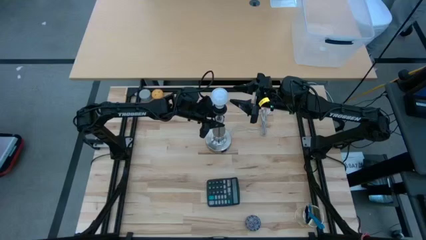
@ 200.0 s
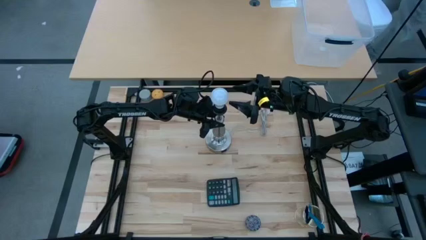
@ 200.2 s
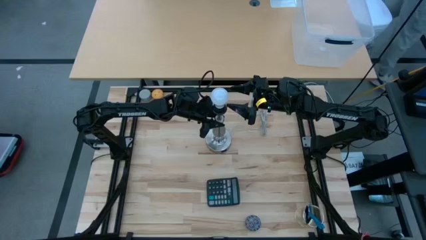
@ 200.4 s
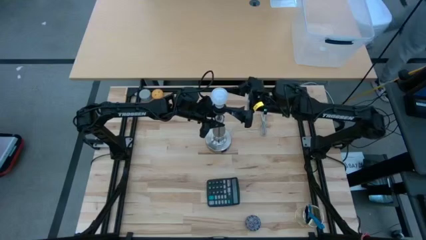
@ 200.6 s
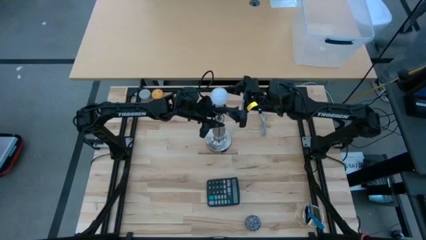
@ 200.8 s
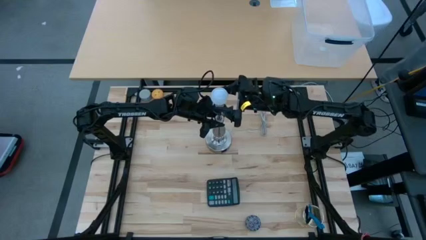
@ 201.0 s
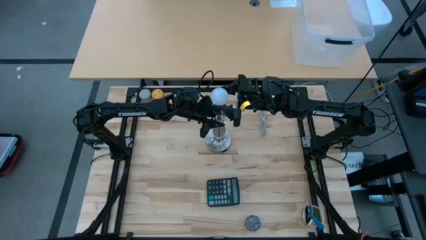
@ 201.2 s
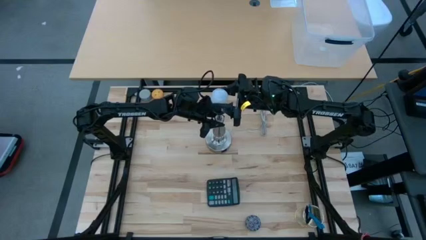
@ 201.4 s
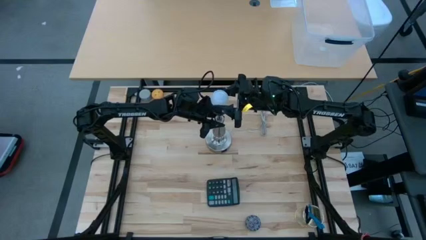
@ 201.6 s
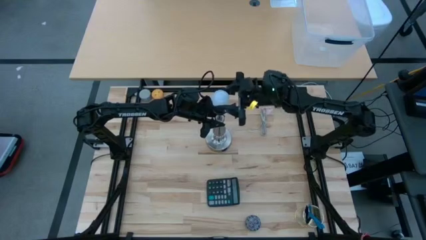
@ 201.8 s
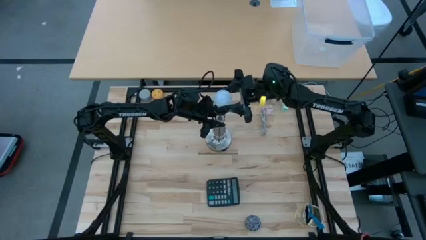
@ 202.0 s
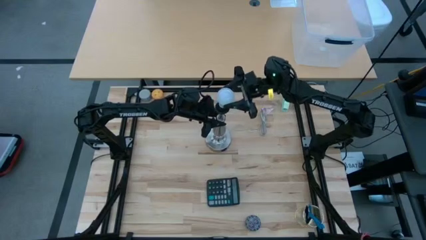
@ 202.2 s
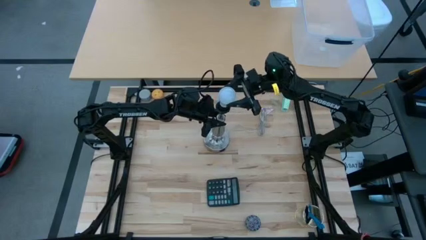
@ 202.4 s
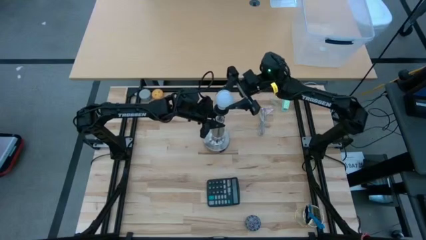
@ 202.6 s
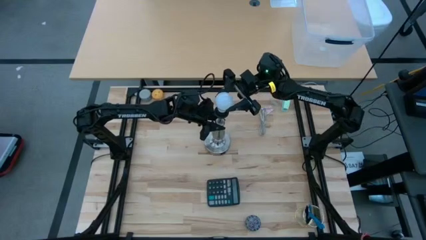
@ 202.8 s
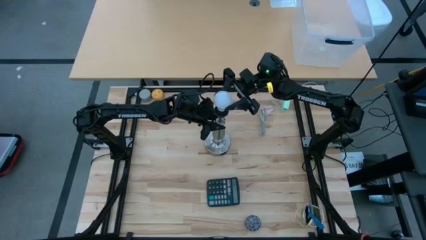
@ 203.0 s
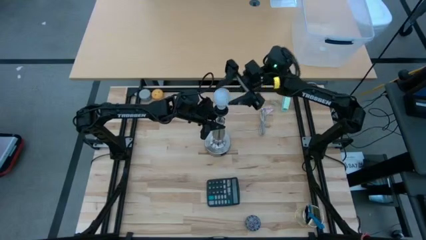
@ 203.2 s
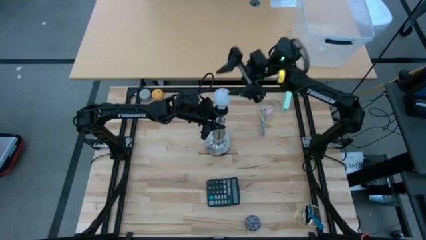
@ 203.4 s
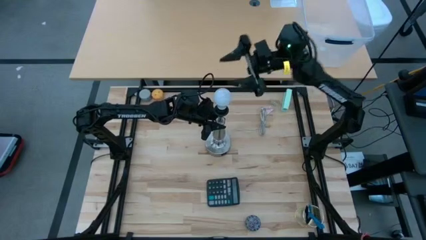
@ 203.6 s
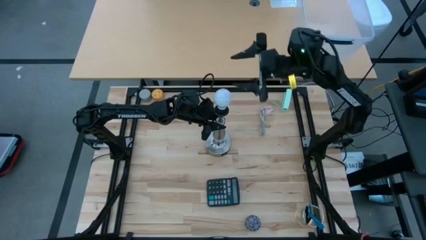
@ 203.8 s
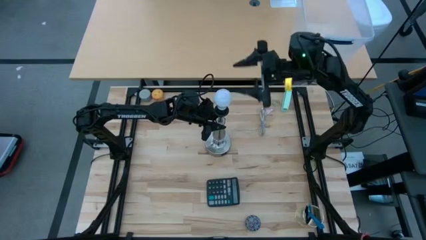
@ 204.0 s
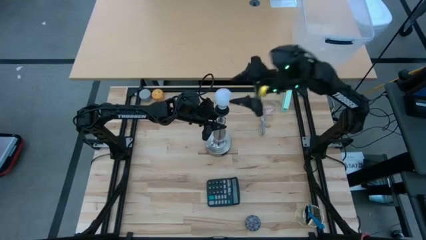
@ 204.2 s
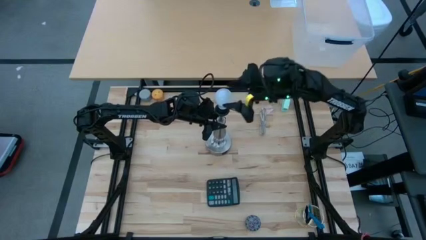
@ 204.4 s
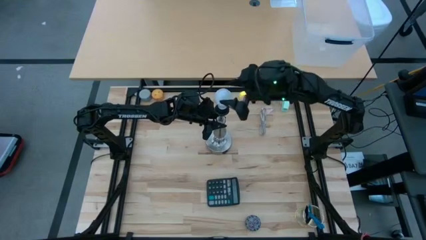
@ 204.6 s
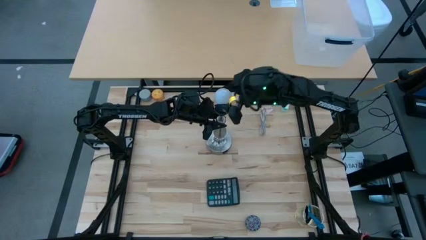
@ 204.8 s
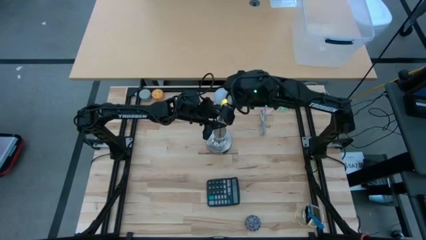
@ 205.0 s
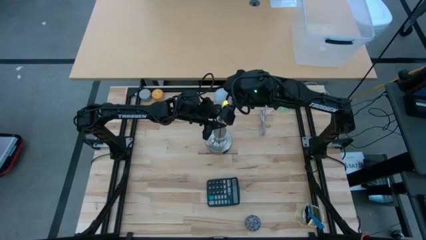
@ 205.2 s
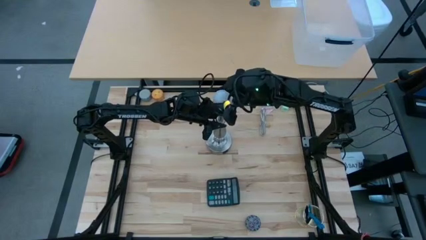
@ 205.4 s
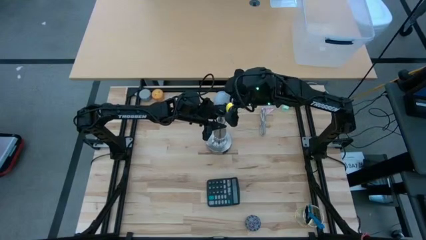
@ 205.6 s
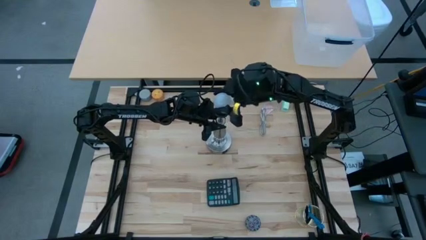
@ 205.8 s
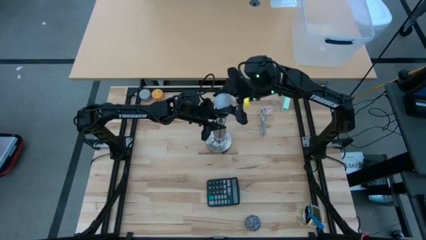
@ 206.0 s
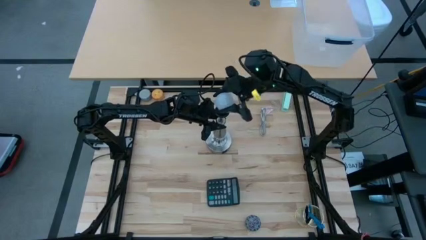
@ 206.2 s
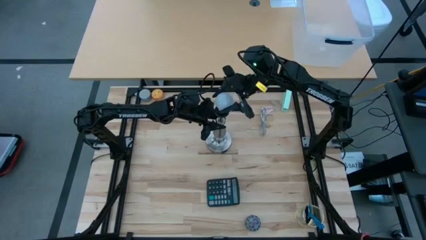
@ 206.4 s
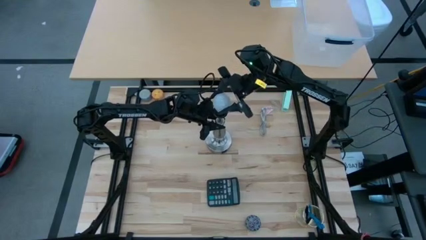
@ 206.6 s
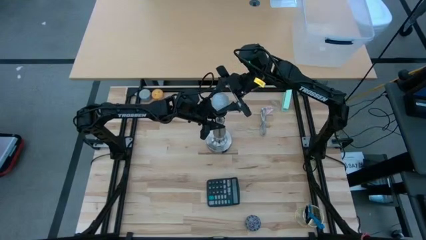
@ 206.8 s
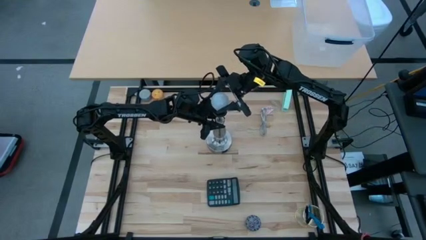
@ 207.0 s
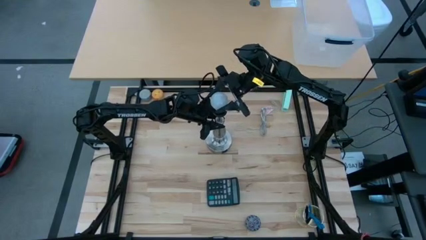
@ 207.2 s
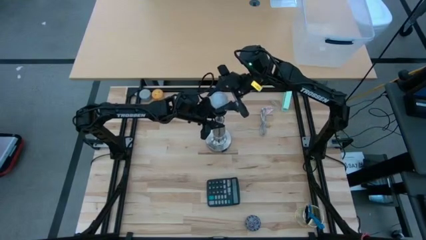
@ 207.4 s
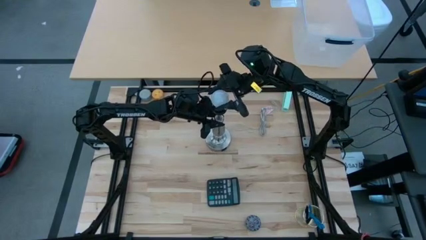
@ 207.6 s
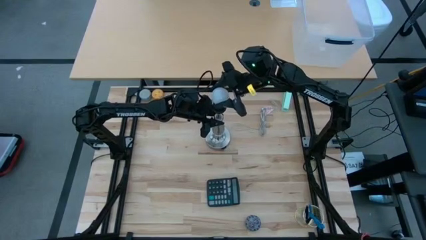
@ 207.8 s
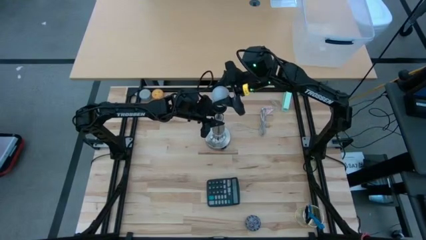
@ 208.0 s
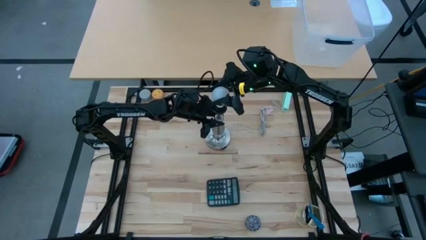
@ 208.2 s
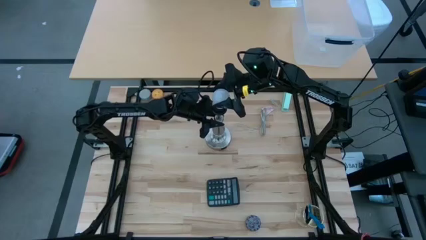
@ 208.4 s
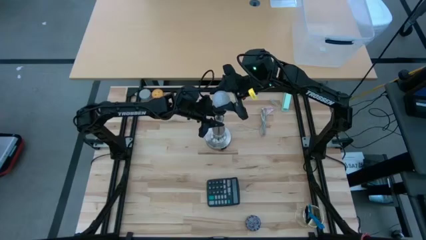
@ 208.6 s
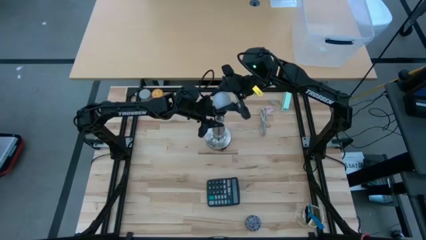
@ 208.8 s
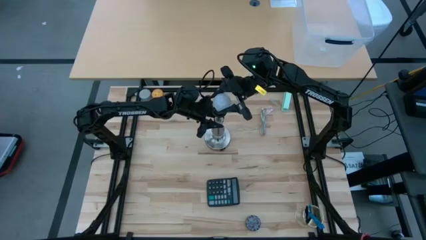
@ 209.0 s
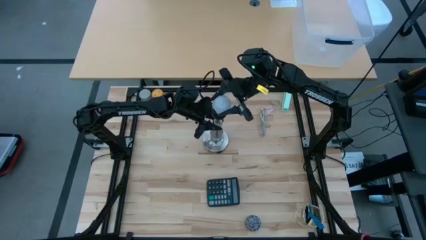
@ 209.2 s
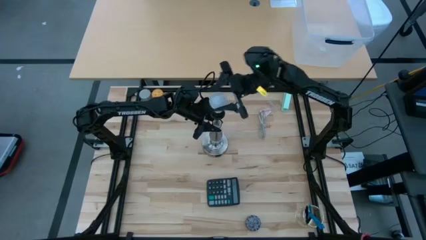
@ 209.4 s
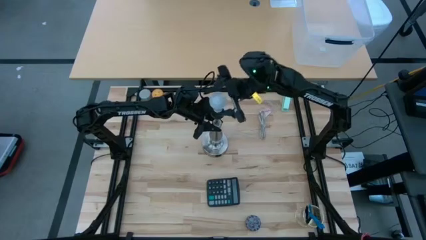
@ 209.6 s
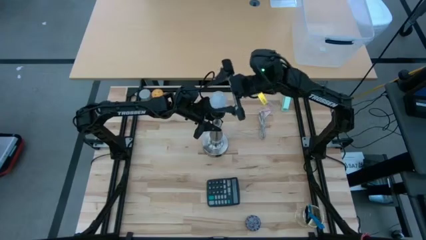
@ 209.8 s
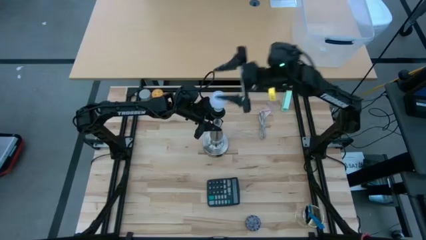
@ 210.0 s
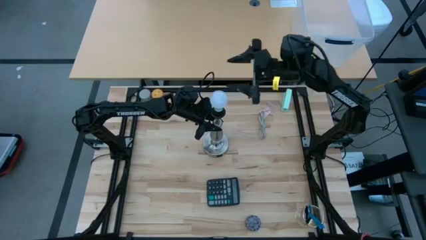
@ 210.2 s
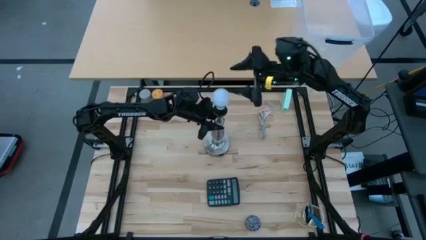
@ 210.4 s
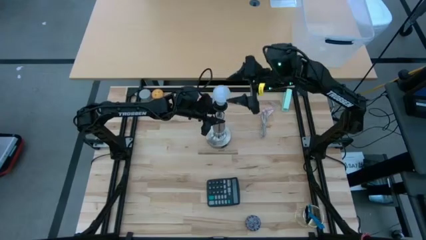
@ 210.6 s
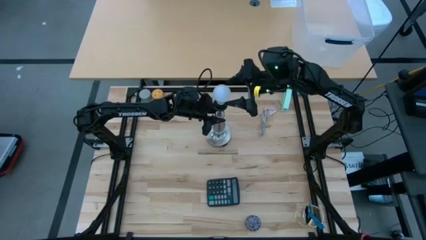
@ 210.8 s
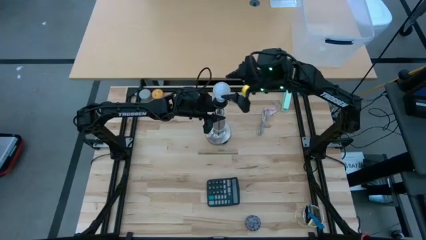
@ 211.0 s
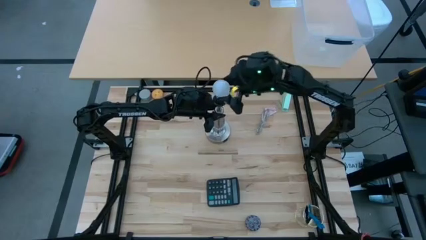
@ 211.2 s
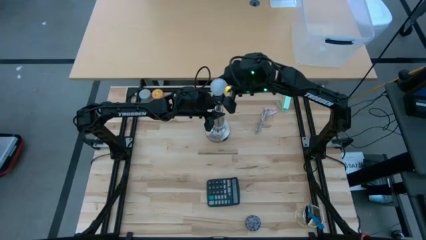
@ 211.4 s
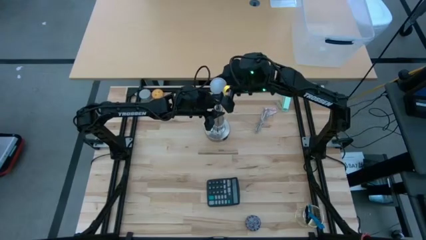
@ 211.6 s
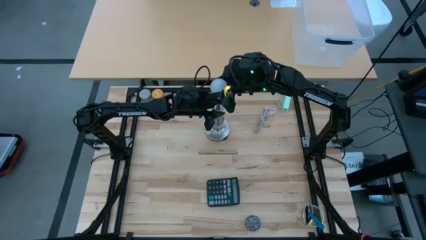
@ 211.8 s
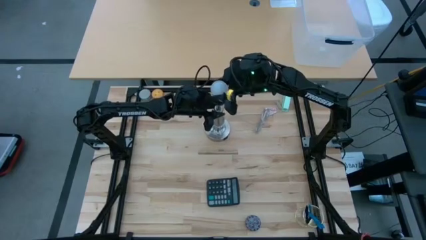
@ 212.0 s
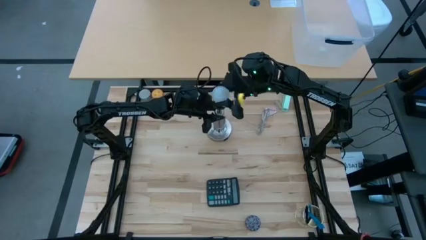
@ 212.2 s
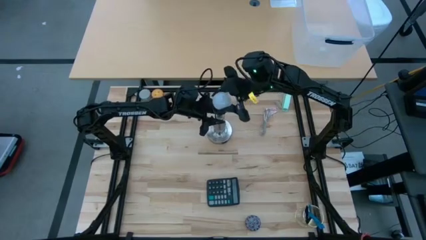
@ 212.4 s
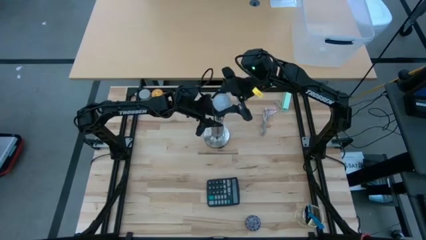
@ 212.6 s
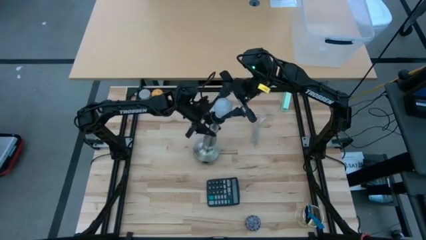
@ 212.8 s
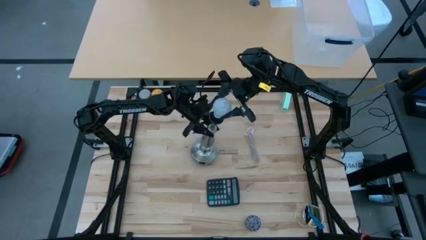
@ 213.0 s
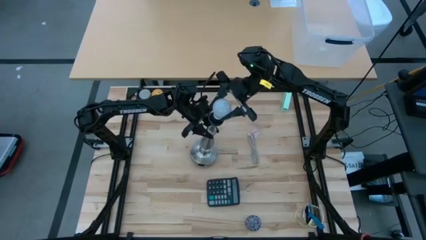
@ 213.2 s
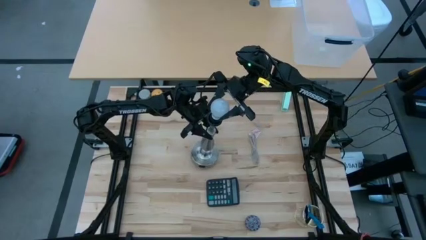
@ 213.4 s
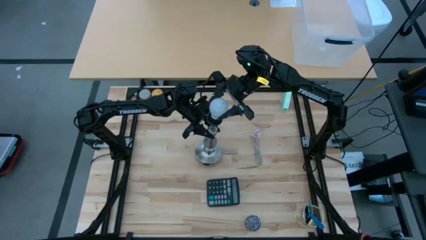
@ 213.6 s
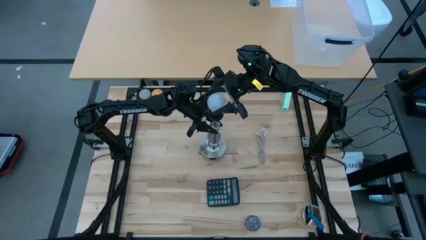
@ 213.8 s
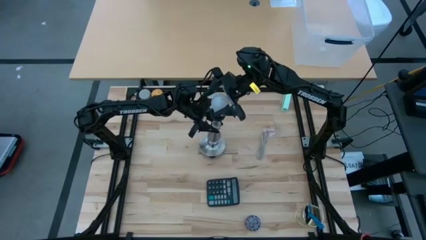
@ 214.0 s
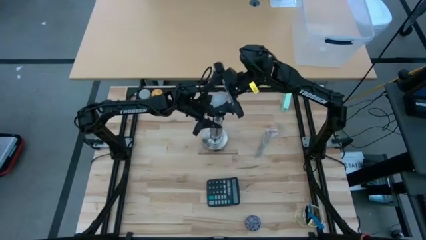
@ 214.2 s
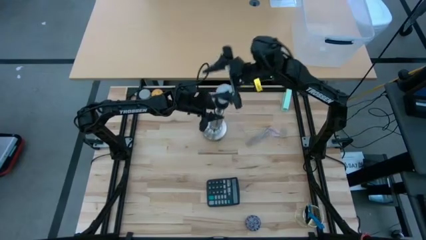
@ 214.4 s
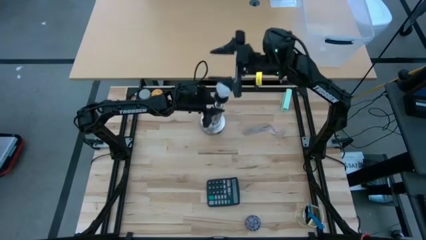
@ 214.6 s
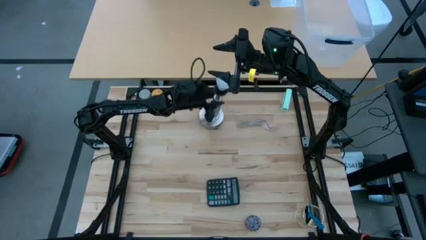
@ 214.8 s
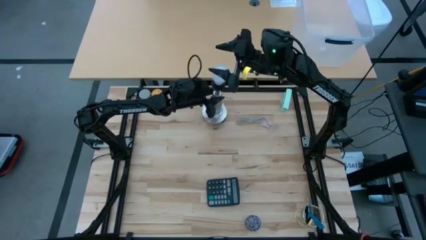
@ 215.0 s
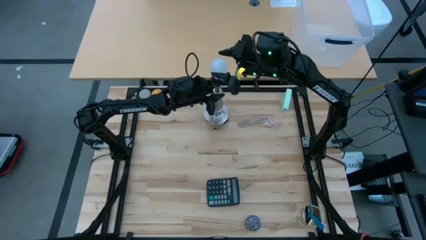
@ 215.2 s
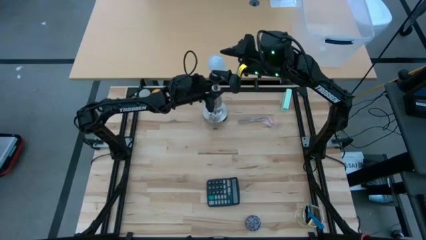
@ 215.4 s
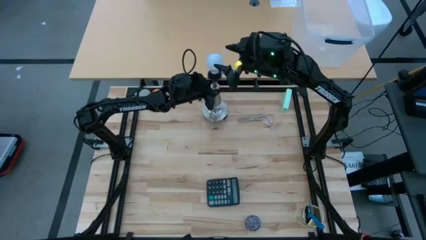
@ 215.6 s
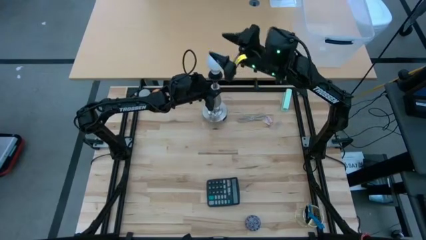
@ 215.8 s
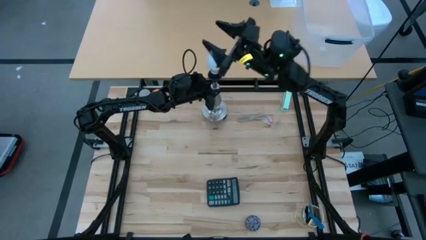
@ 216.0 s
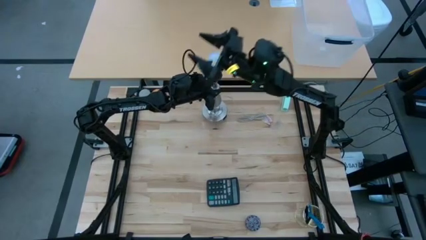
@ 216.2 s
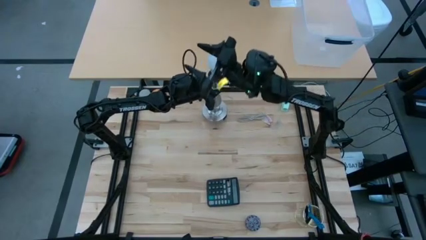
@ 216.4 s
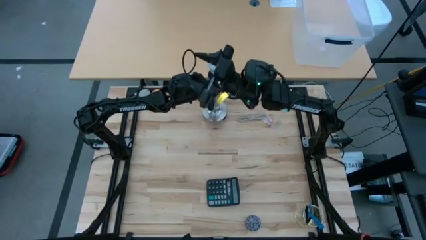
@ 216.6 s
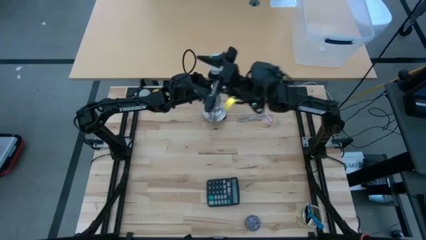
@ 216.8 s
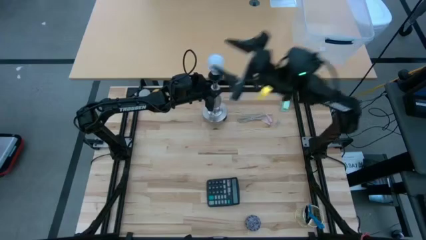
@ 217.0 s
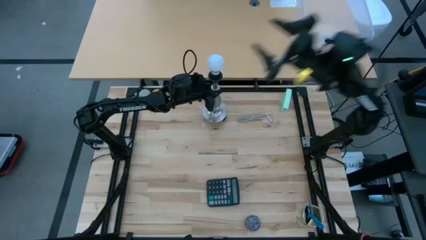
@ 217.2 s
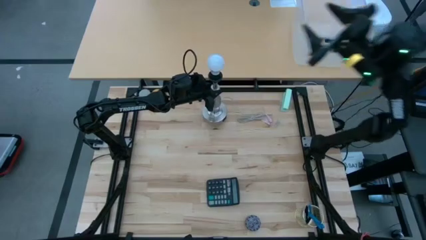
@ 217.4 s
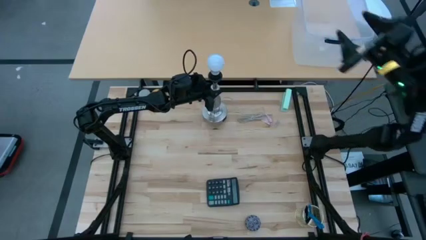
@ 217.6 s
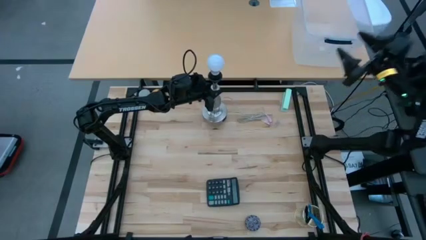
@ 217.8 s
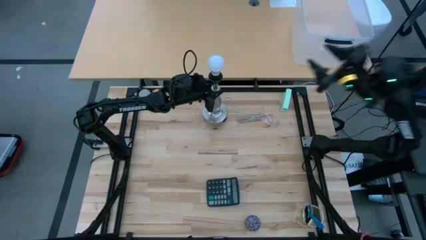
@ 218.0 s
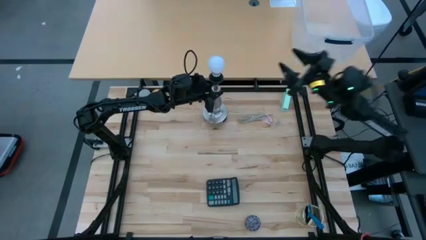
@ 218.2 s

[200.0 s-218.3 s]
Task: Screw lightbulb
Remove the light bulb from the lamp
